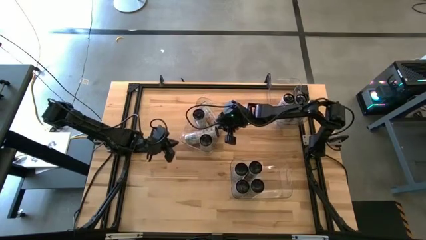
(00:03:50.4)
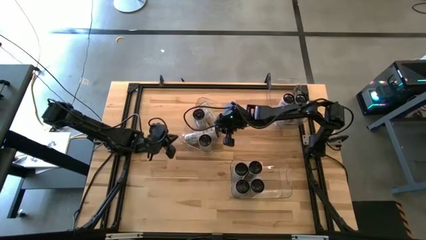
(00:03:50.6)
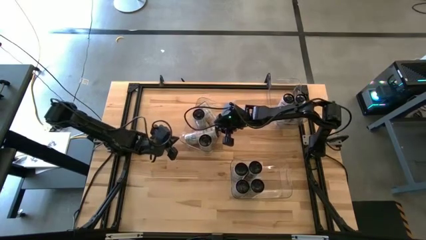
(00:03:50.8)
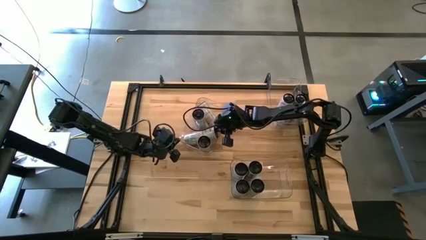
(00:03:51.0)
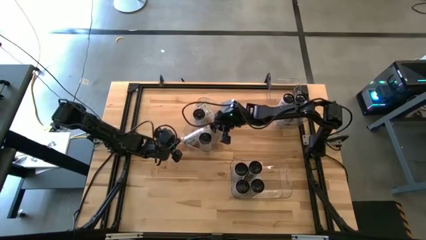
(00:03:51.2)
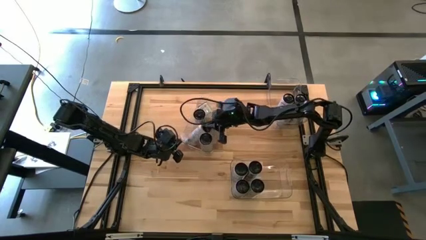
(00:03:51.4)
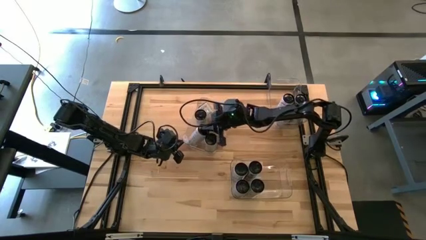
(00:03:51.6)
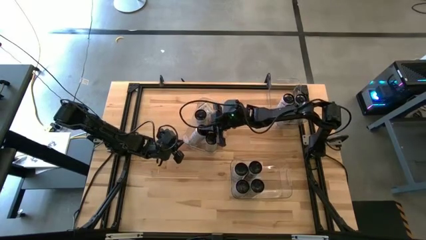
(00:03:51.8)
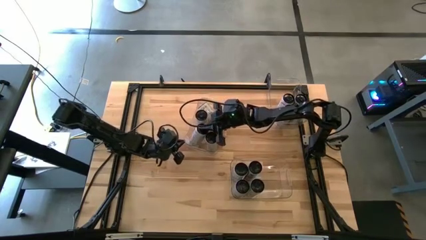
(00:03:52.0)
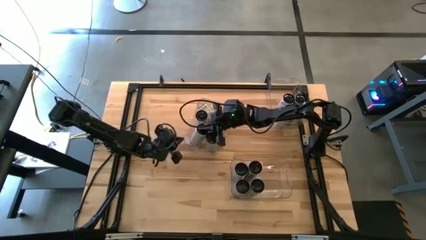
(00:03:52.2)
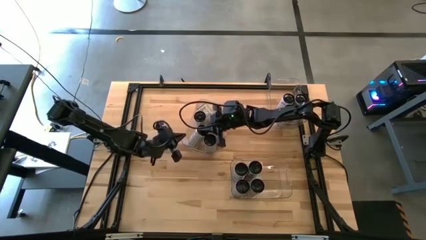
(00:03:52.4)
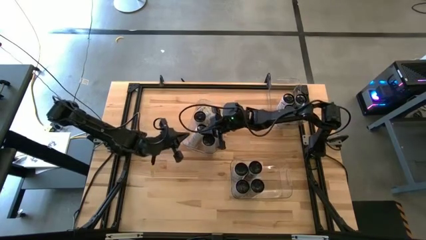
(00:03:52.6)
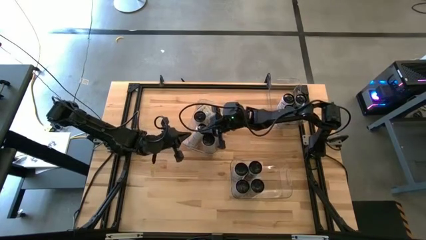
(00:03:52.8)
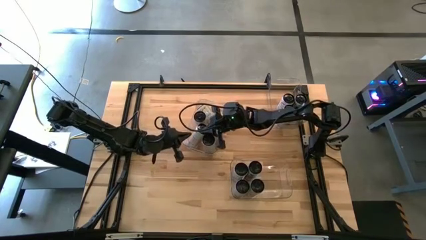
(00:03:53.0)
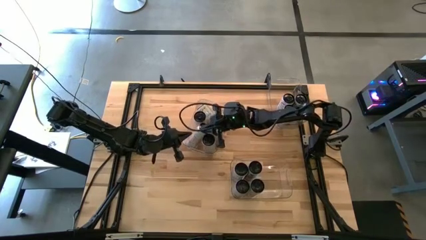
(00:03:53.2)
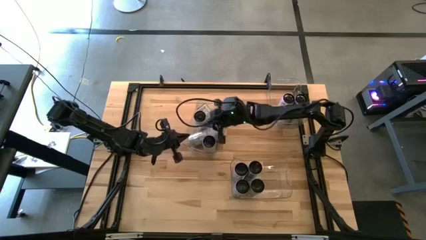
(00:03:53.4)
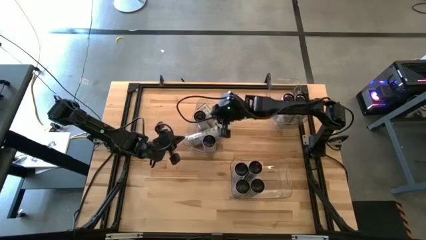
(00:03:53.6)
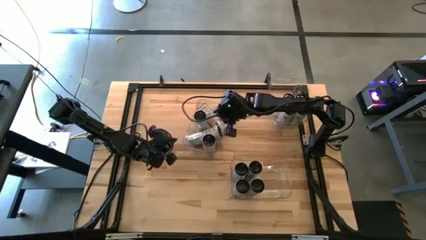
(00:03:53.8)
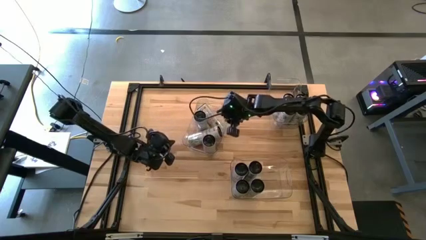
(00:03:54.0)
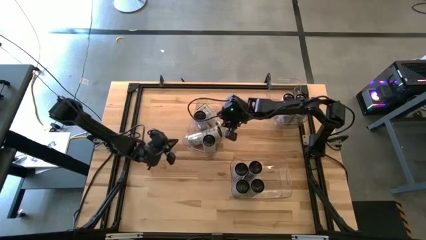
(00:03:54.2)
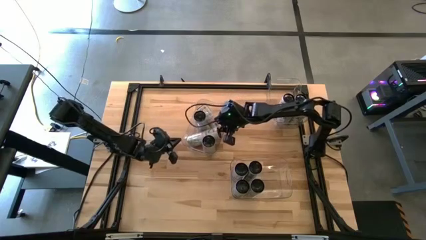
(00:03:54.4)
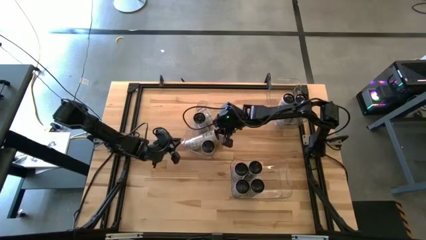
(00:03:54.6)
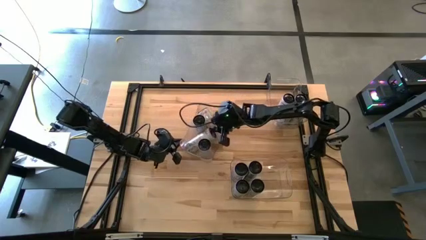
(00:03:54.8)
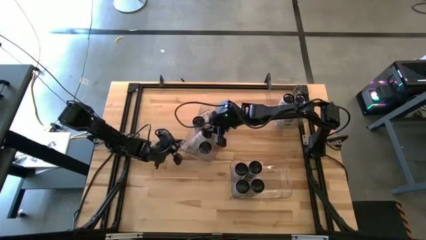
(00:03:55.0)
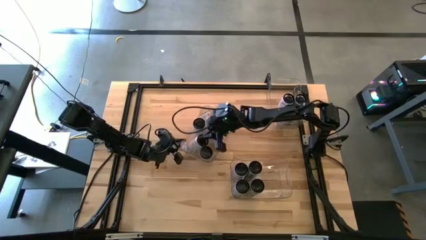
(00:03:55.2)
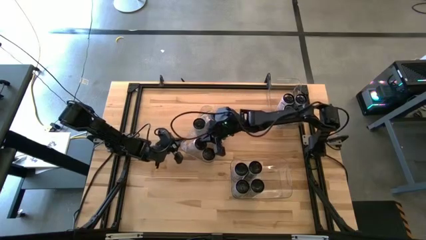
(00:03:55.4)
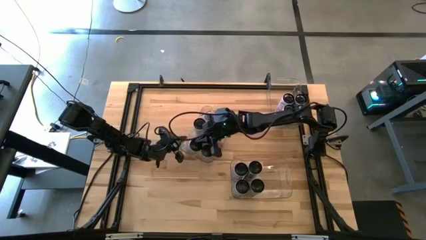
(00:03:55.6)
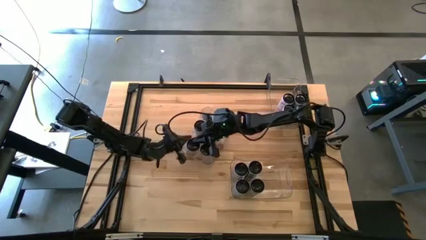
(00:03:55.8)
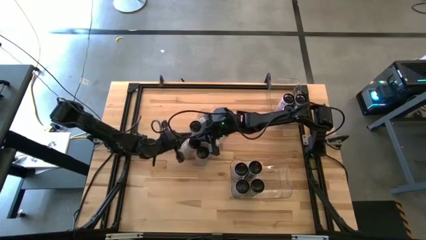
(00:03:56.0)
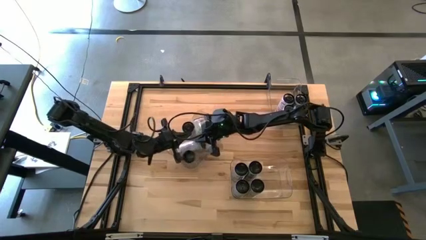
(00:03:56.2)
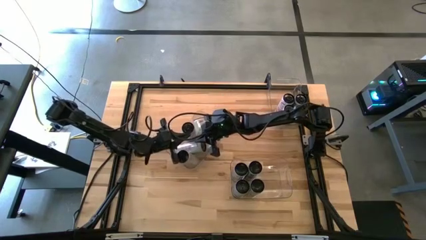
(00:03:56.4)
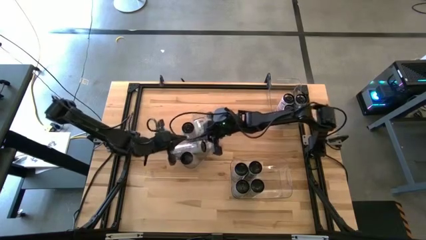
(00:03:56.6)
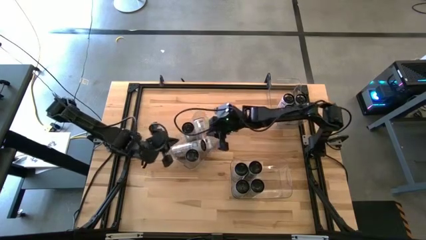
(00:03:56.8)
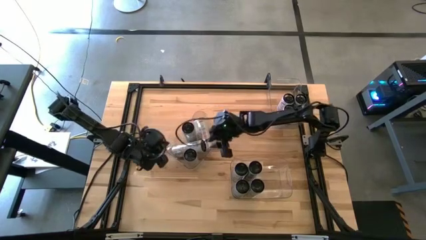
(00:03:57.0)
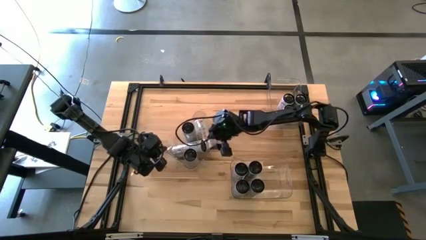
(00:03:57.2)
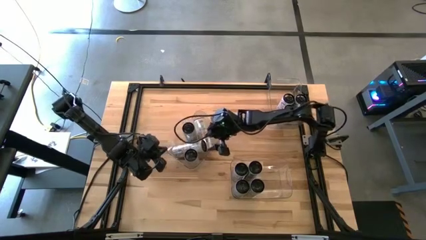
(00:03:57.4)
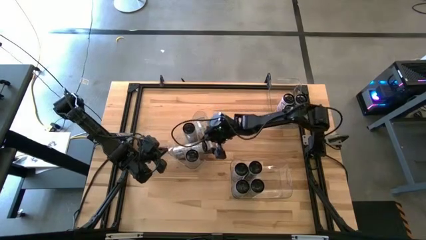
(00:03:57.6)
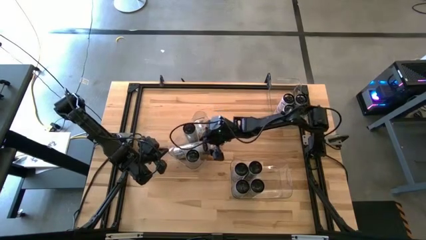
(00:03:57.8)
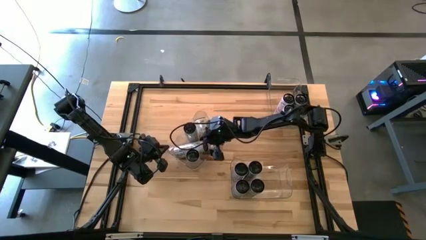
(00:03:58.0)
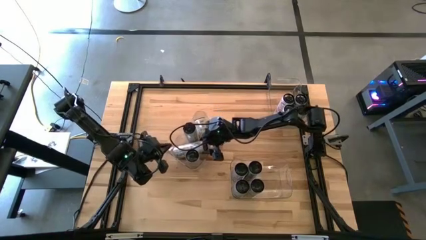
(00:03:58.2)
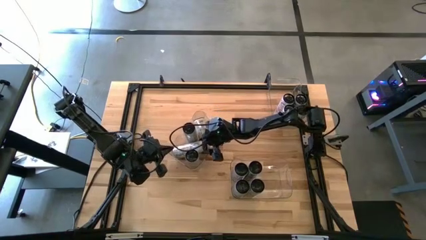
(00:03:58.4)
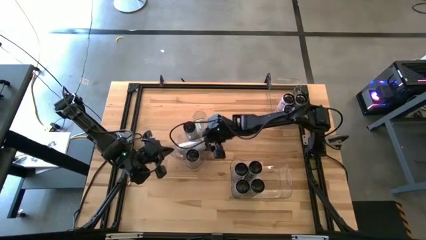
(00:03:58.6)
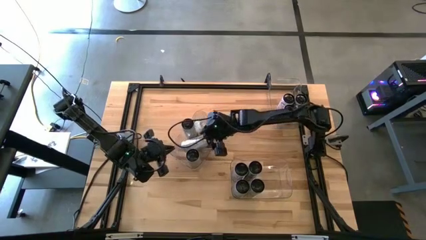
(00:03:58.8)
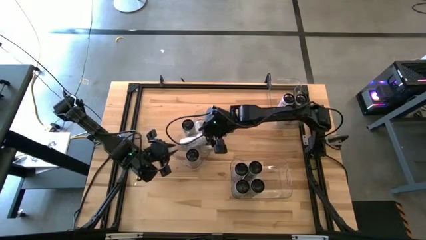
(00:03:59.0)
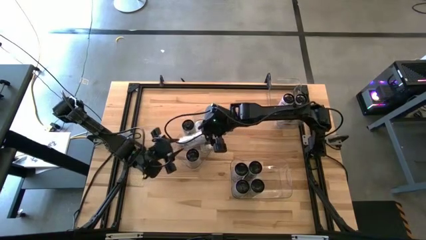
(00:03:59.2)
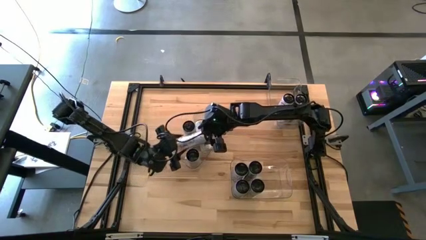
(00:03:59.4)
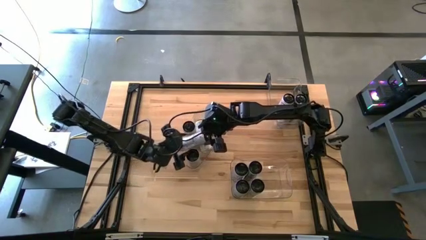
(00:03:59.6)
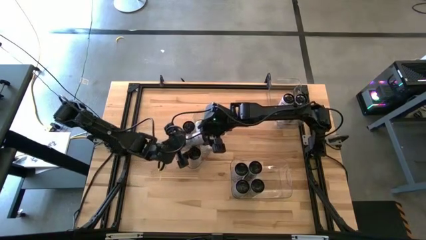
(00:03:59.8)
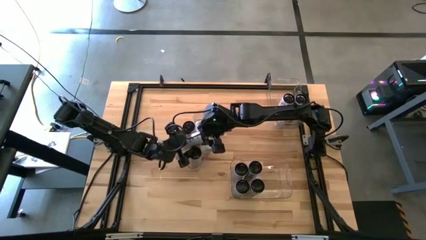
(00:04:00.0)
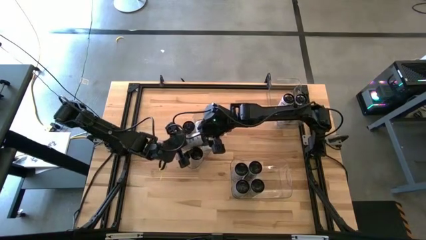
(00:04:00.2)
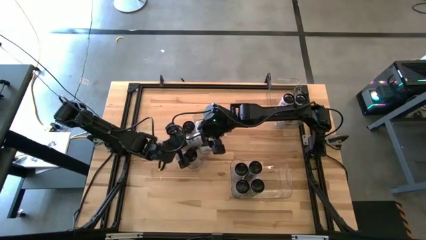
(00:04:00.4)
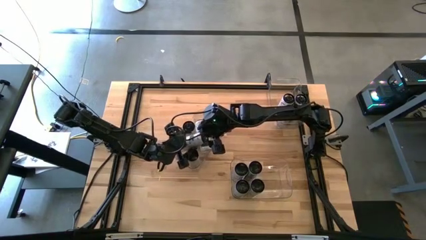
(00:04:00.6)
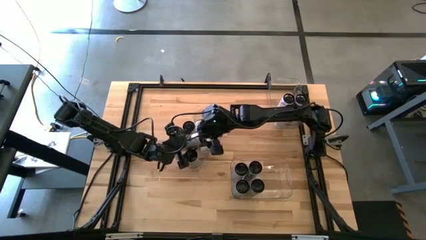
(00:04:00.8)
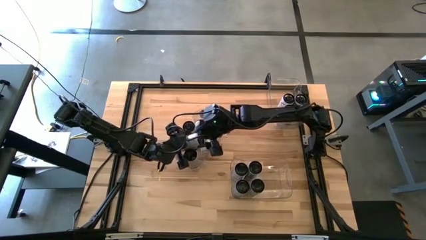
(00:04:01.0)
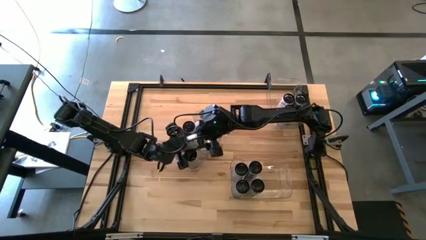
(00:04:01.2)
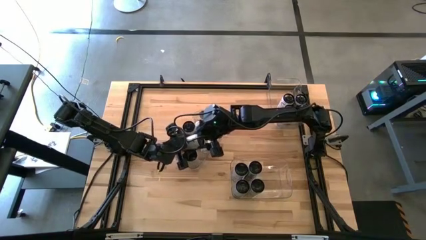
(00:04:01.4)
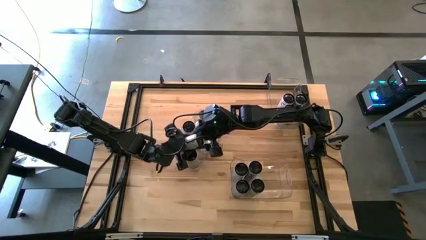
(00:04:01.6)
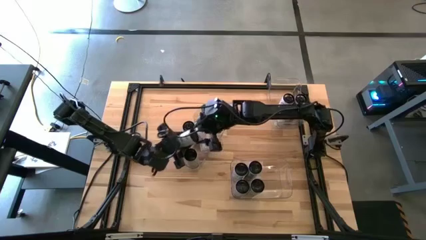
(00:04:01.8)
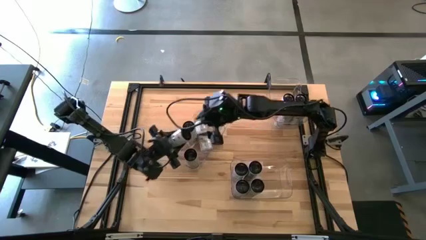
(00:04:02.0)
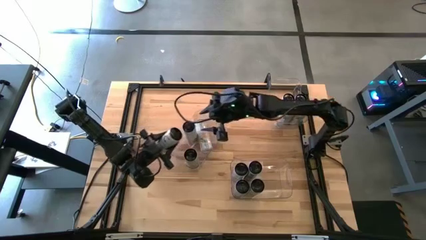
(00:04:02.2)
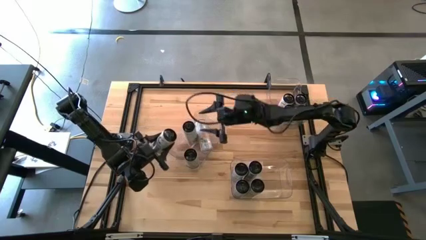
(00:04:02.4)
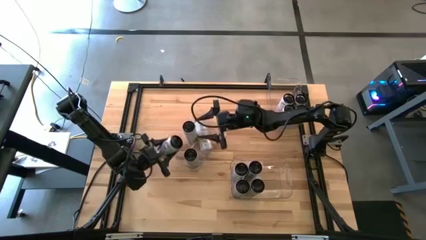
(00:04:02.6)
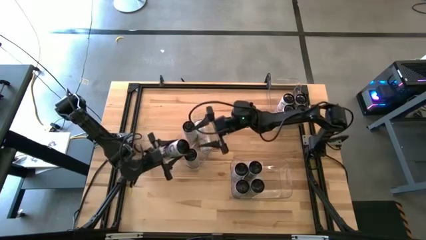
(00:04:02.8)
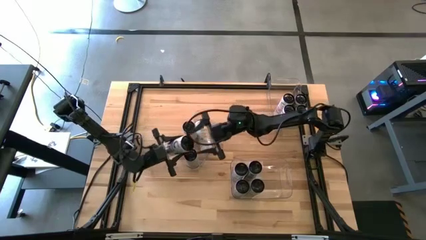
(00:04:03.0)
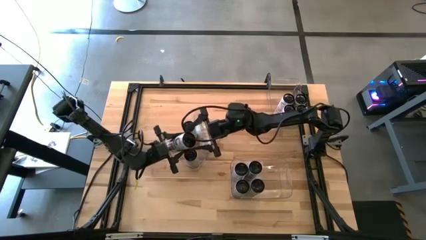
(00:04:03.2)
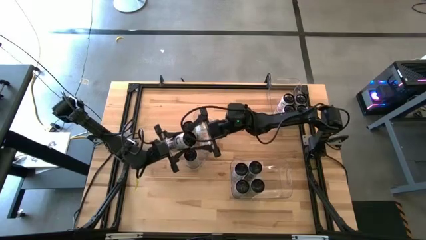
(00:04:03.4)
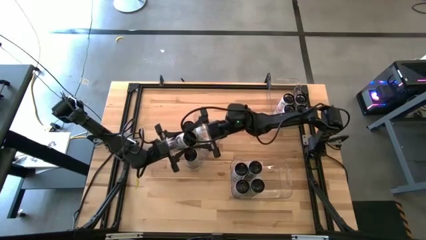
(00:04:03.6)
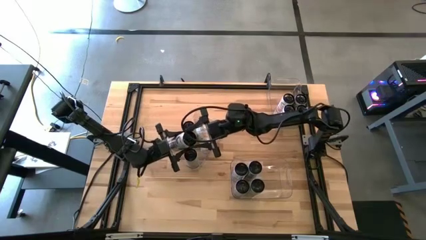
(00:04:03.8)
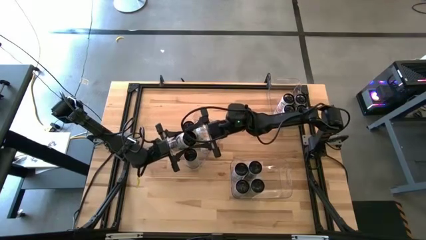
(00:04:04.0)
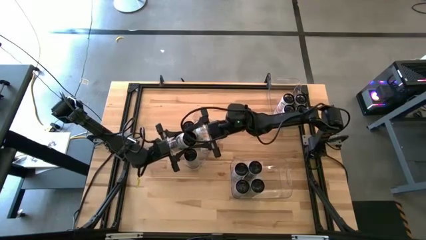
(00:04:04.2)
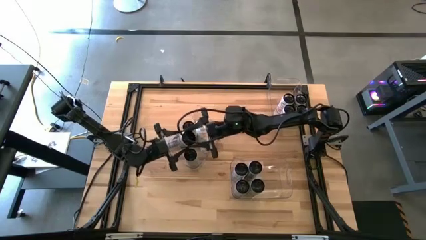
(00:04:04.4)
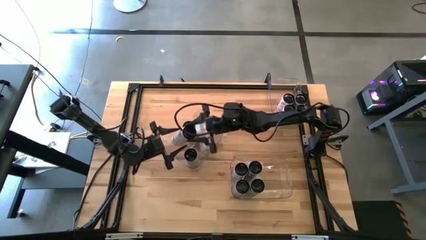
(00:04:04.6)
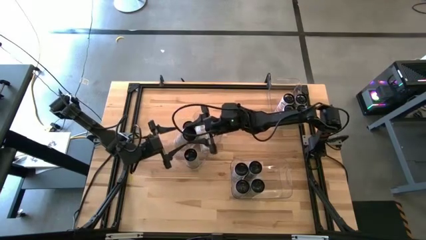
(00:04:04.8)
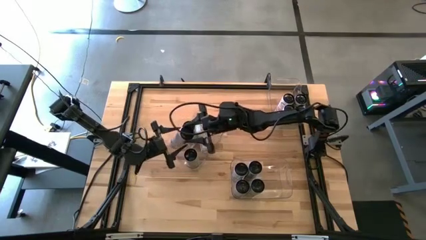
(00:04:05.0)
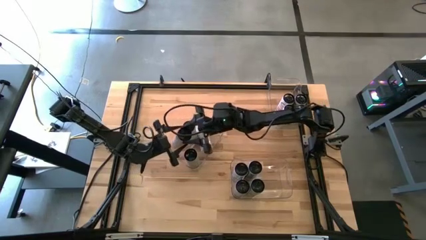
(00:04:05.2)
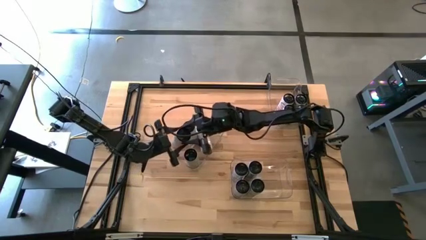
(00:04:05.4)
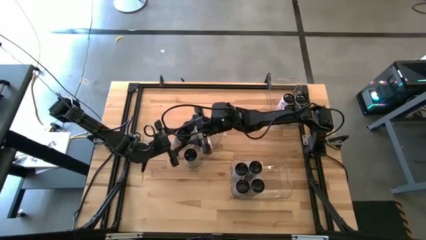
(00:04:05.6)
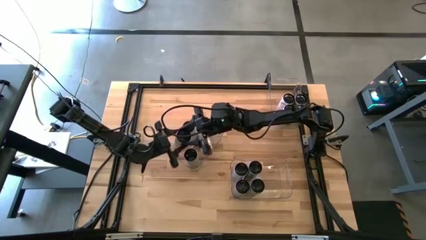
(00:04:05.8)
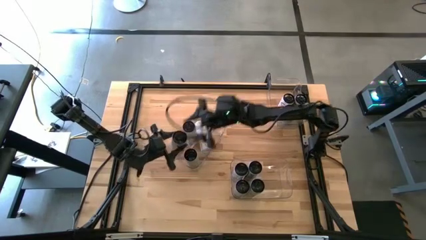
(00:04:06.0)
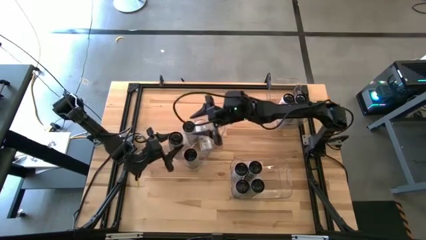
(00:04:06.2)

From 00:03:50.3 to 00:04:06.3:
Task: Sort soda cans
Adjust the white/yellow soda cans
